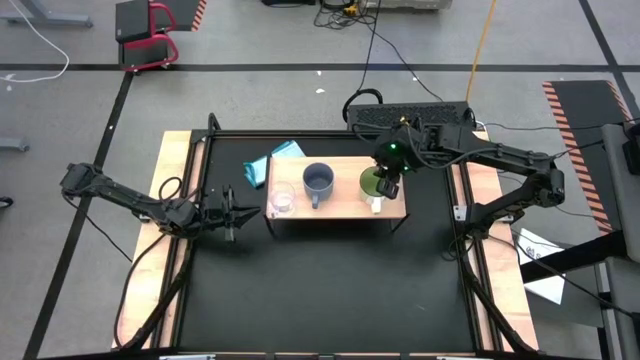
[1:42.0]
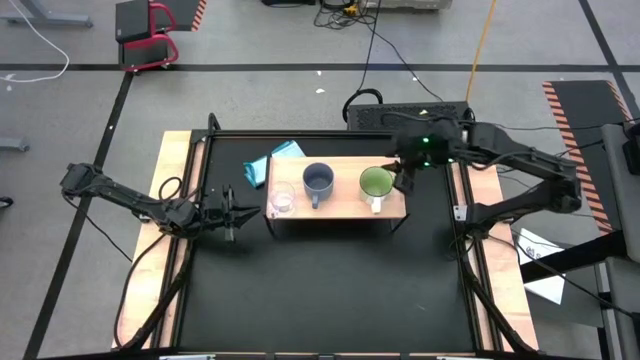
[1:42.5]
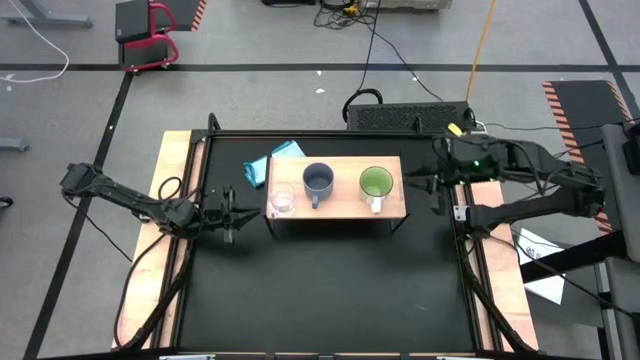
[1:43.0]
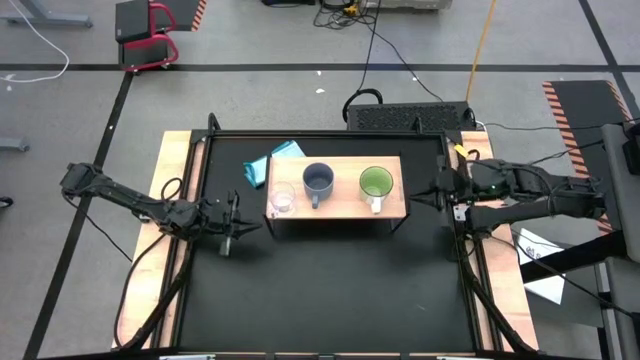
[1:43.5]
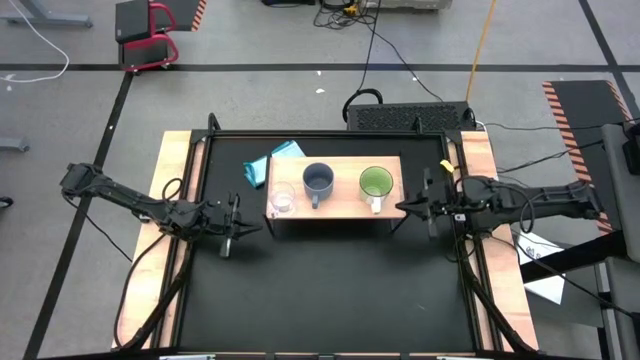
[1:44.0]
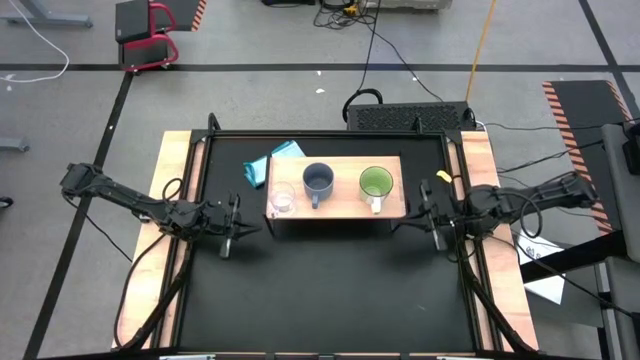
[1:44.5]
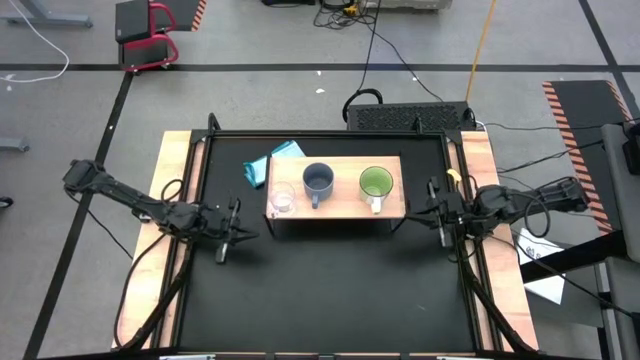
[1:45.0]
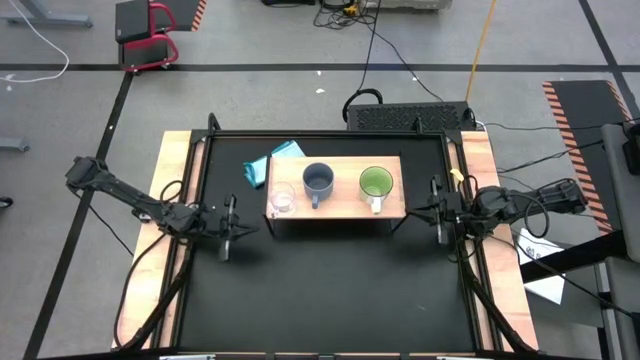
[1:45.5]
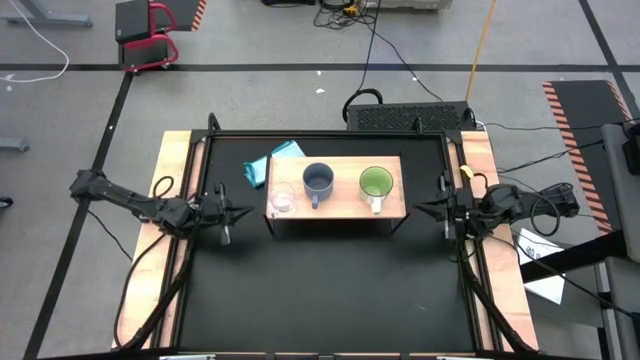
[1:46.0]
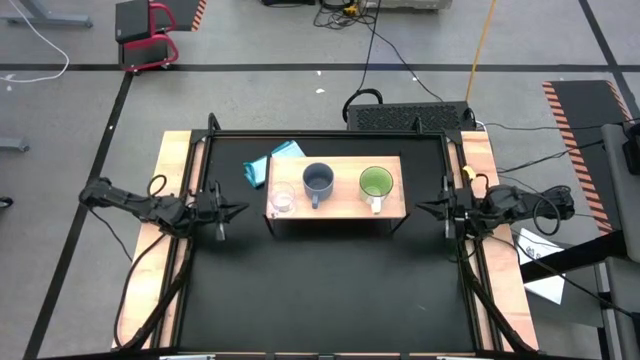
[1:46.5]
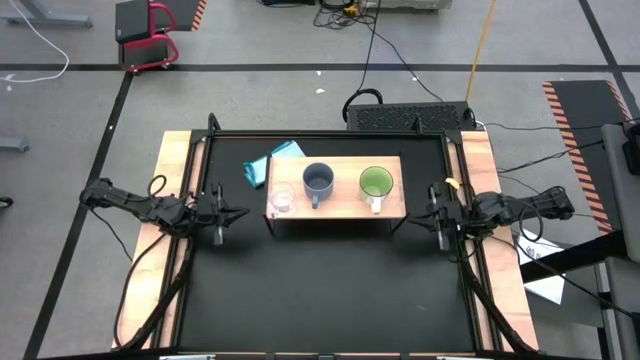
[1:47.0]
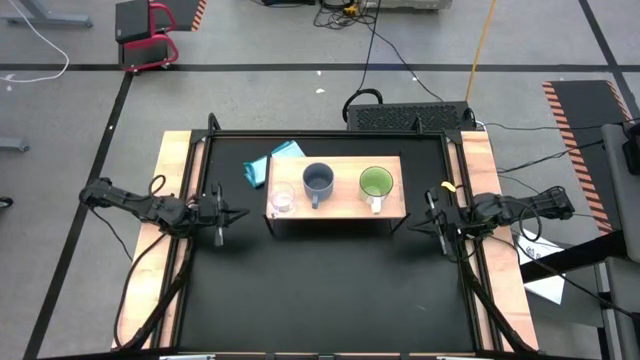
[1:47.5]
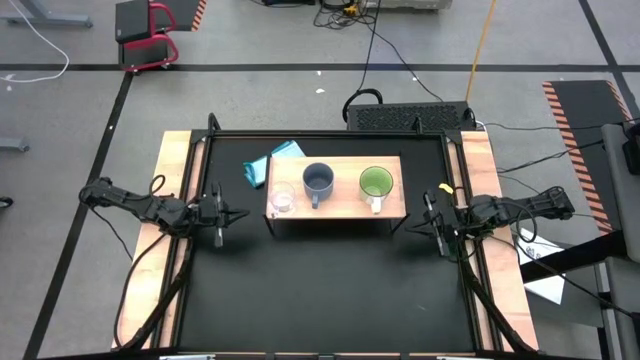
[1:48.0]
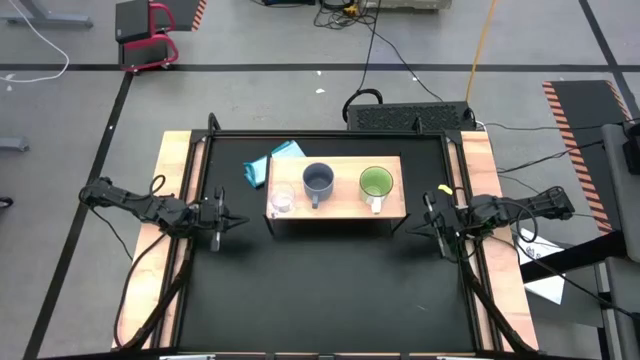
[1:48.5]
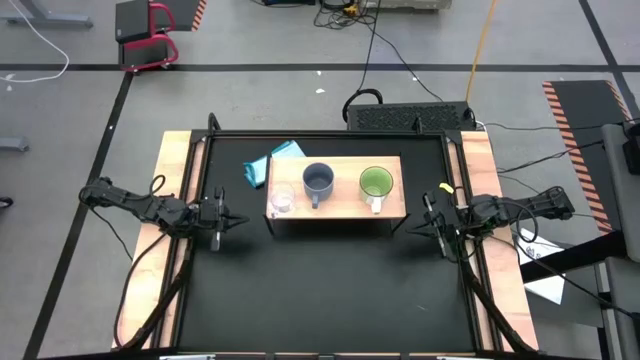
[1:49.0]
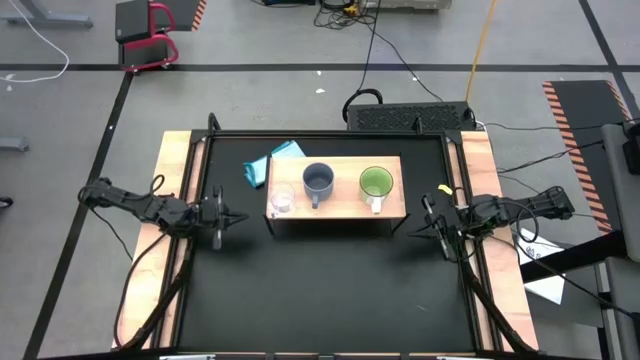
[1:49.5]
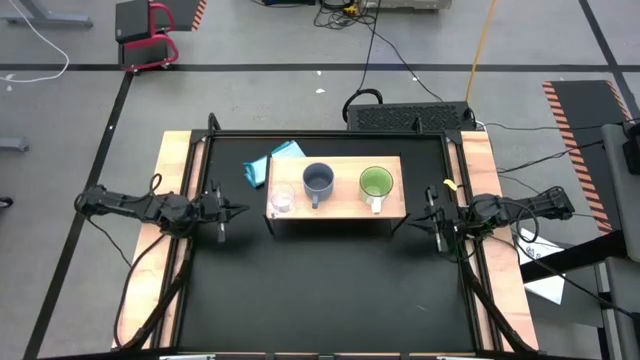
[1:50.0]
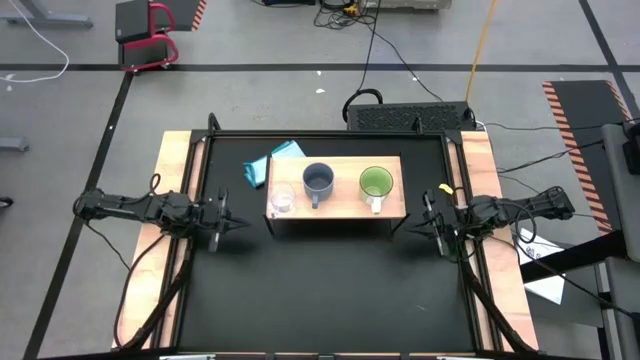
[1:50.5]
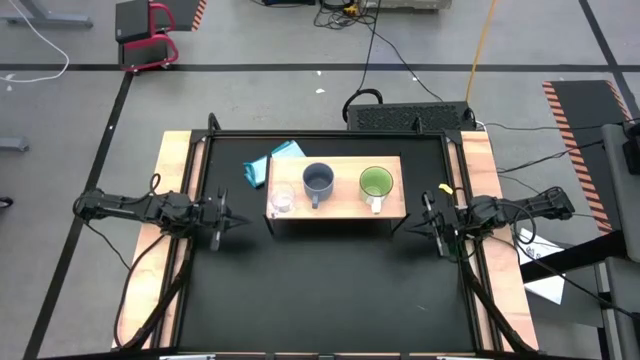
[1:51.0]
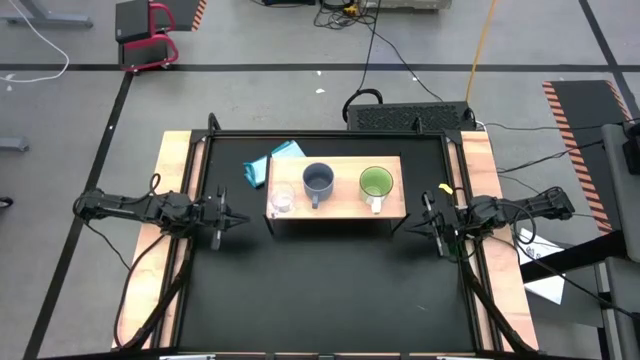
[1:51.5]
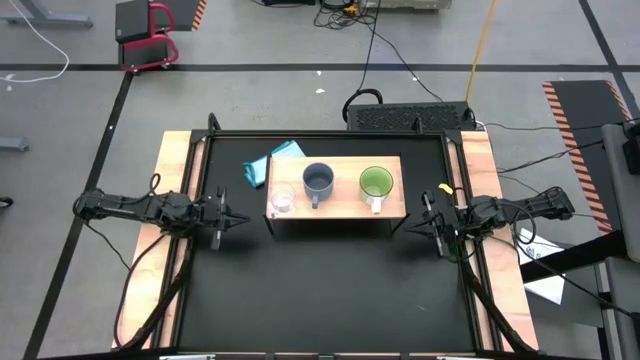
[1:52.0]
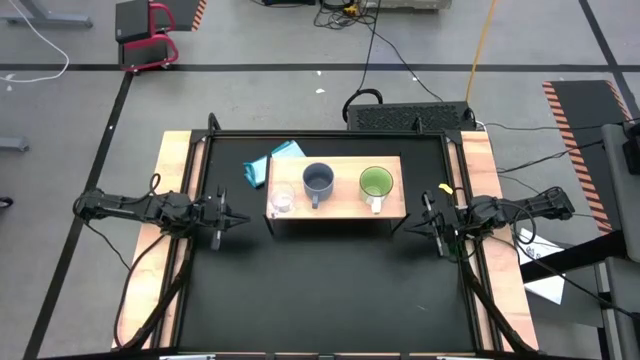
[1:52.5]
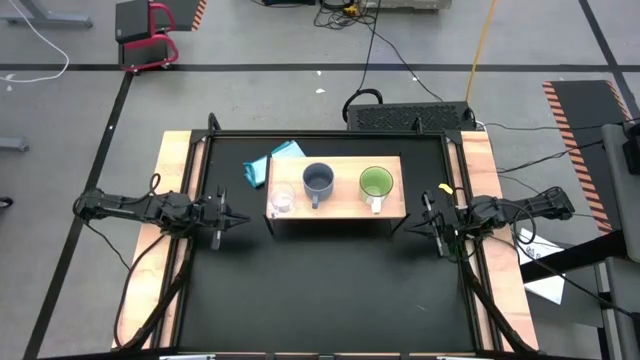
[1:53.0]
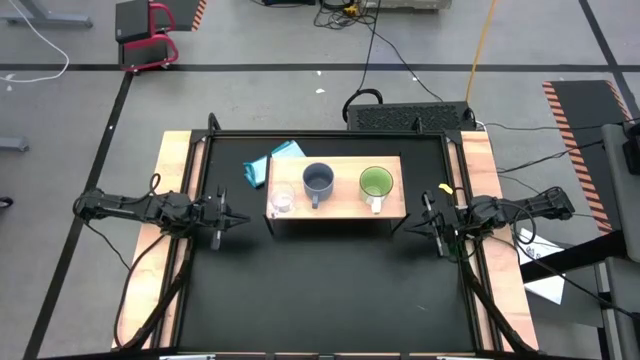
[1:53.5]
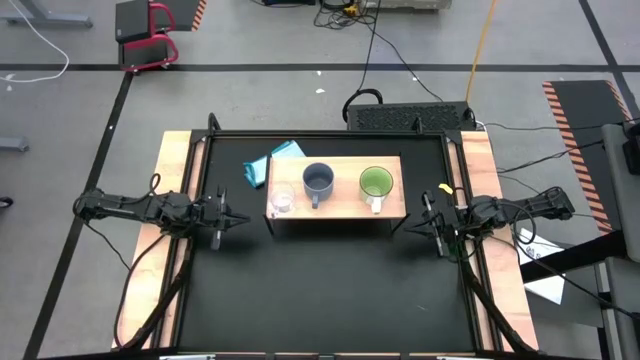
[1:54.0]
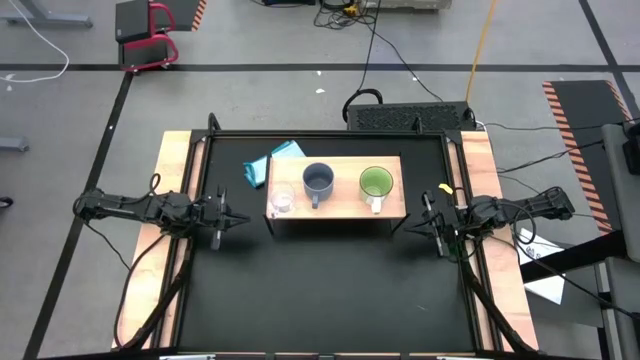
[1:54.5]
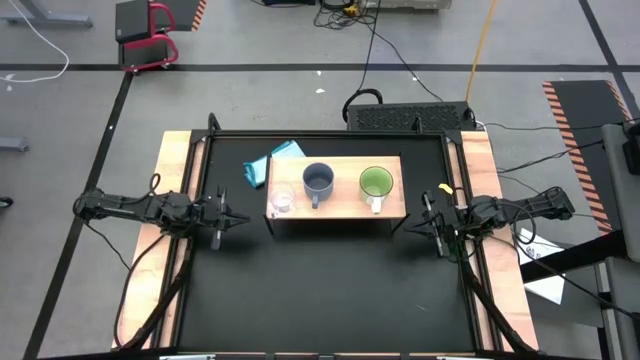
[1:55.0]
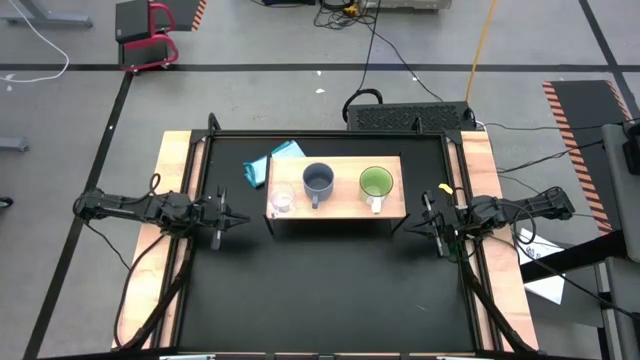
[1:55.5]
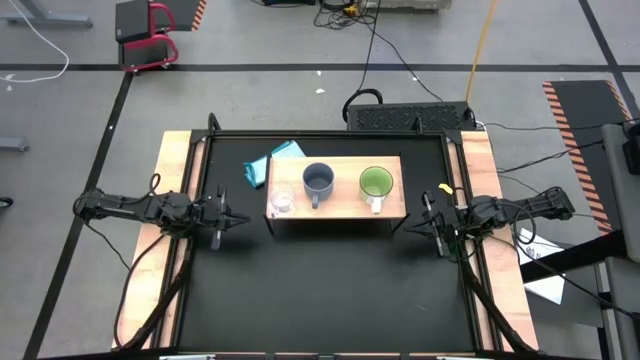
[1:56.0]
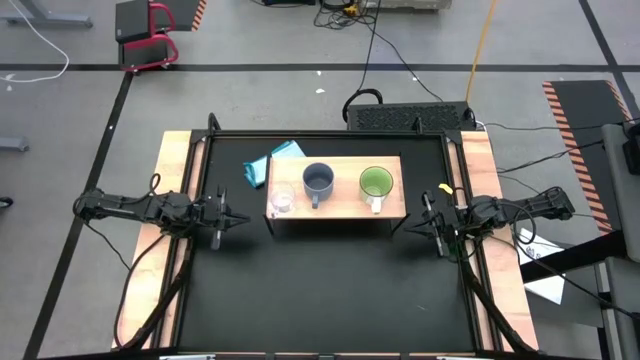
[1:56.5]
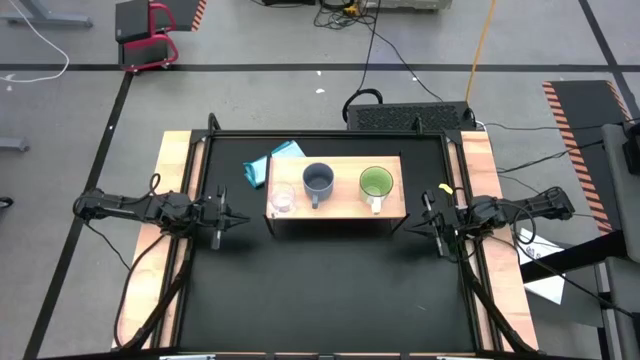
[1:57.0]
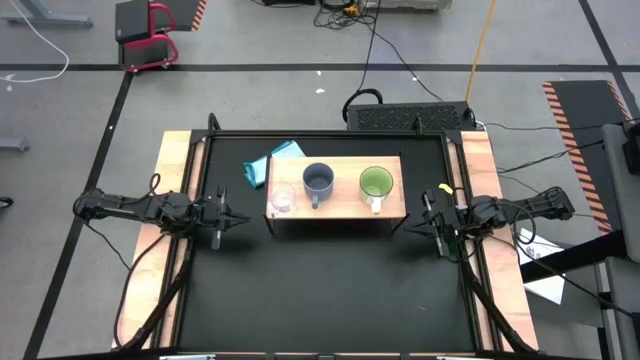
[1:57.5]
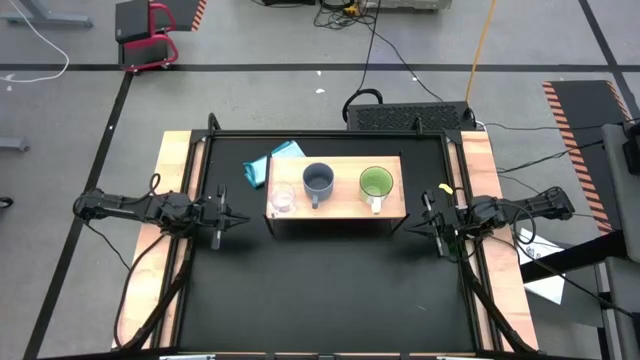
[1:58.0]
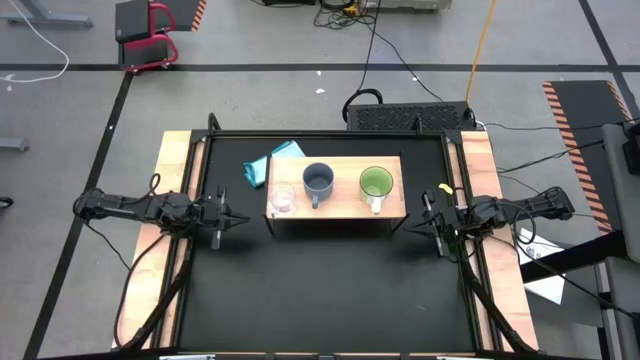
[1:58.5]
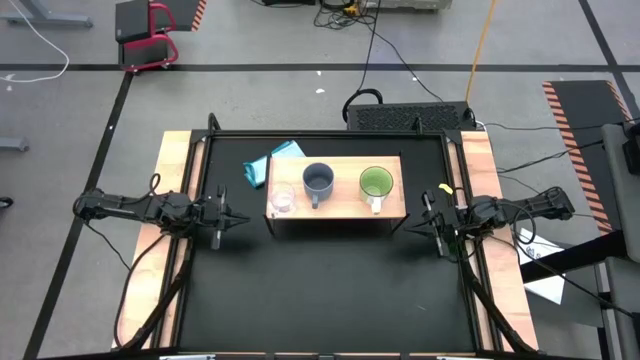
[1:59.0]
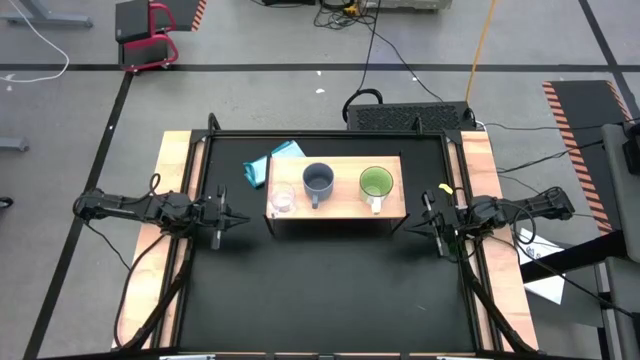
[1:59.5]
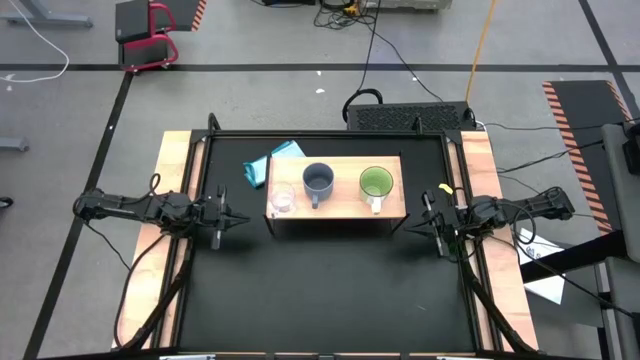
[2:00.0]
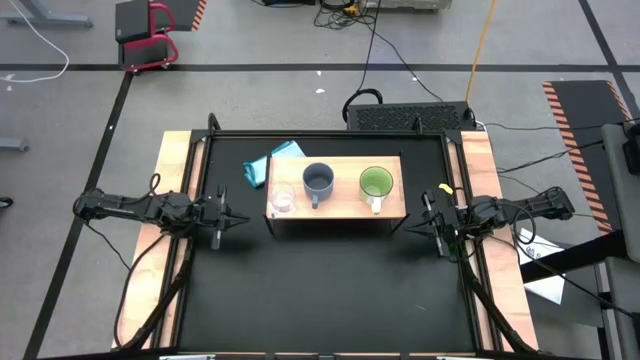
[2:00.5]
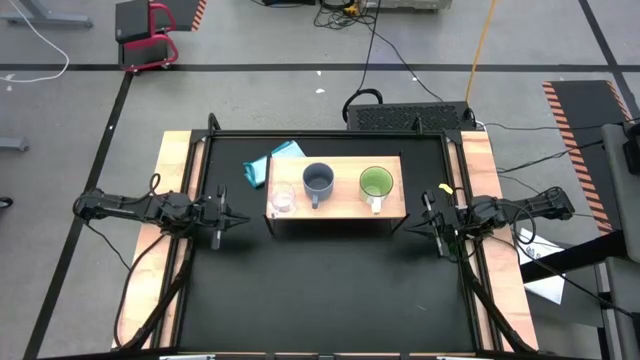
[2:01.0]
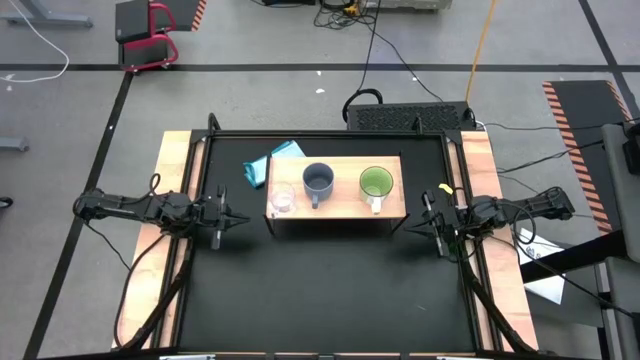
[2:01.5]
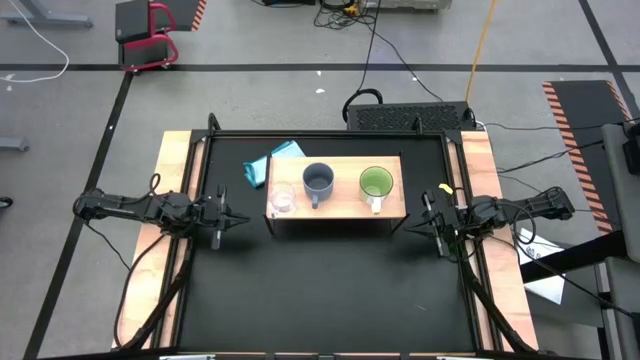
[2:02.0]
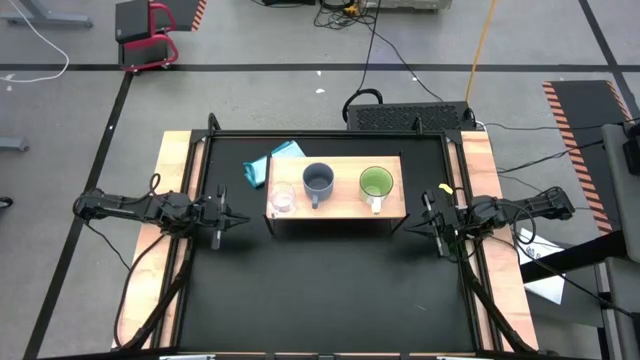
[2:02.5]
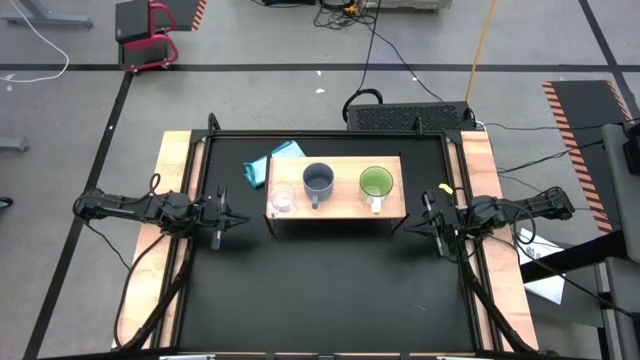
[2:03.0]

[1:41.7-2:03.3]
Task: Stack small to large cups/mugs on shelf
Return to Home Position
